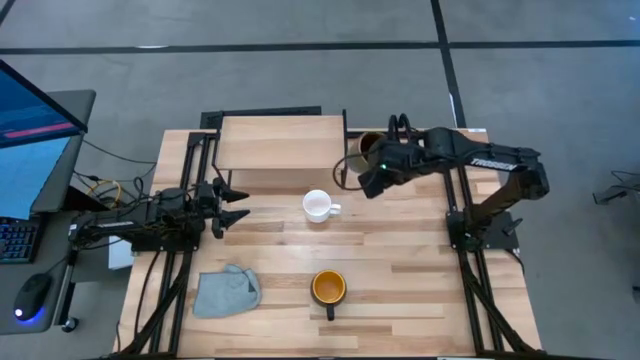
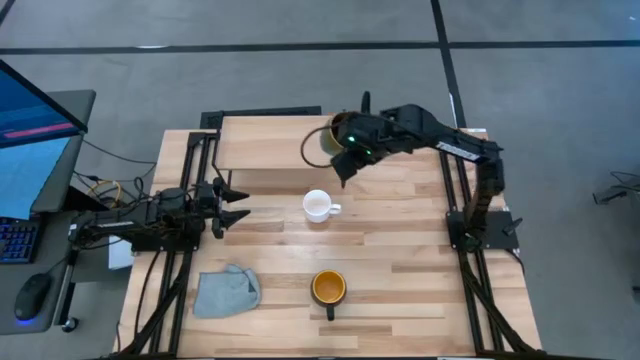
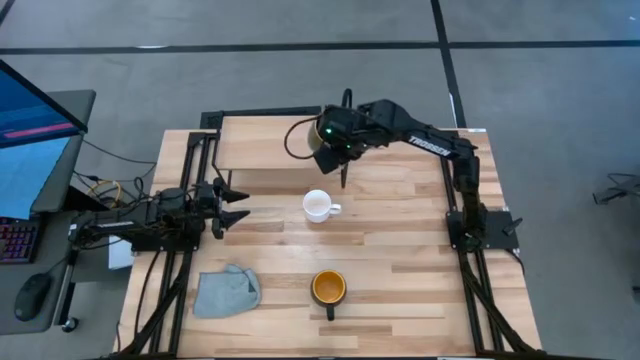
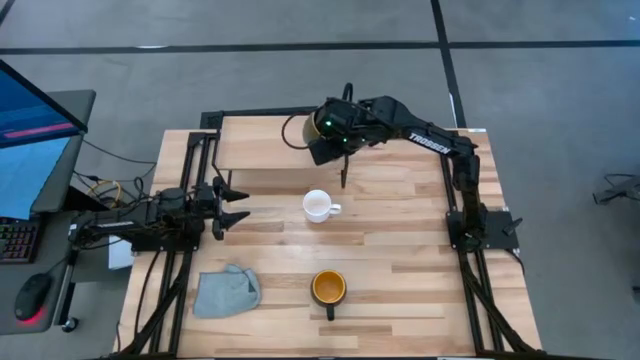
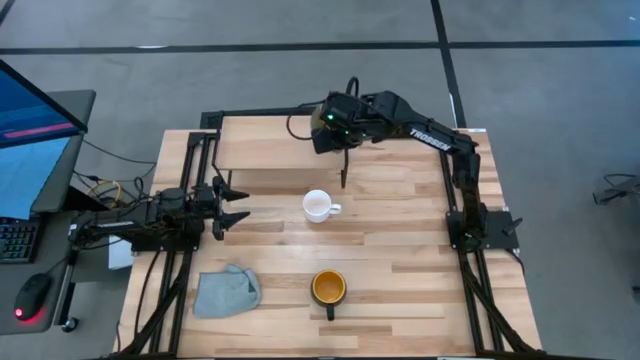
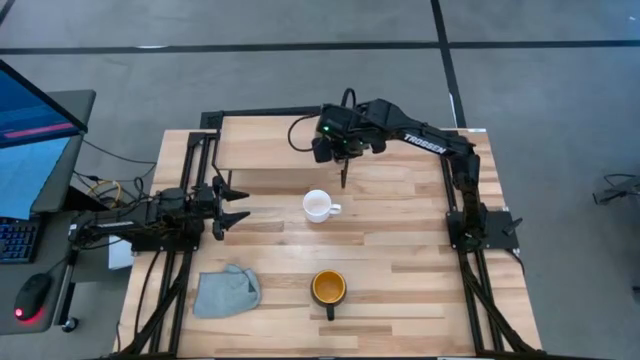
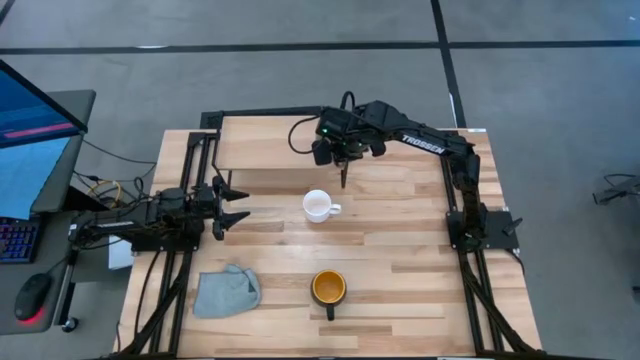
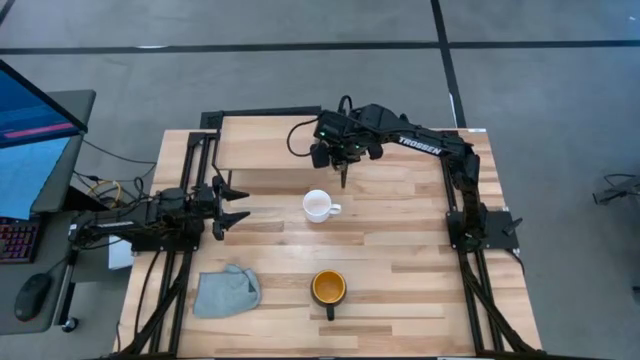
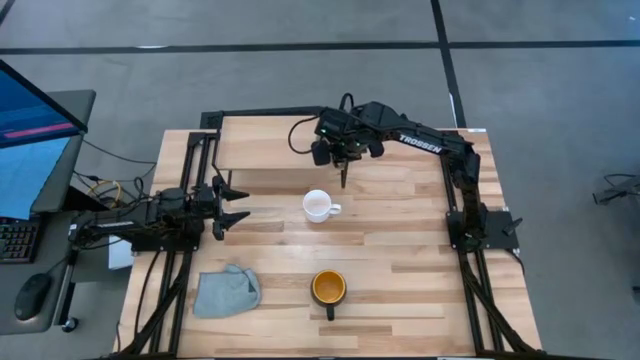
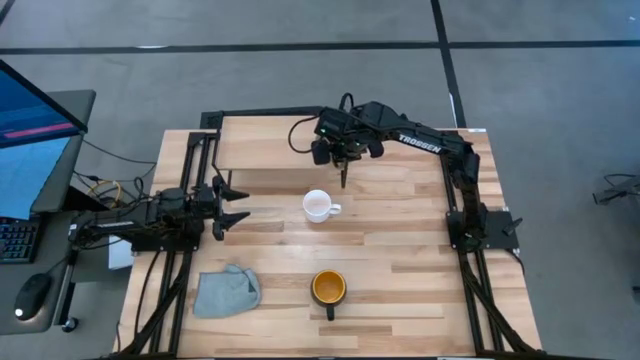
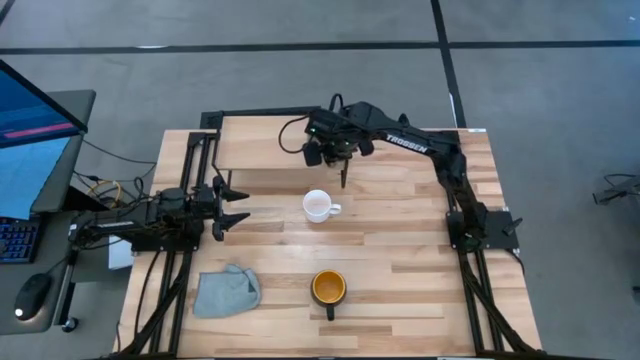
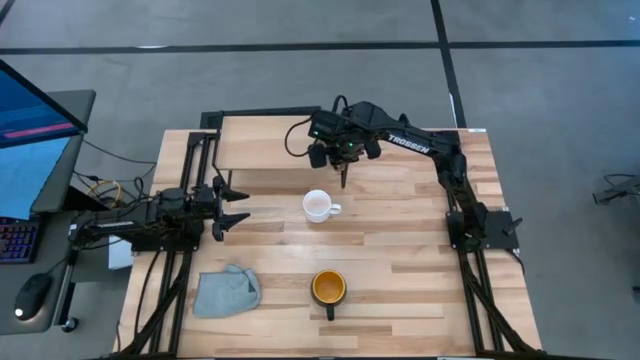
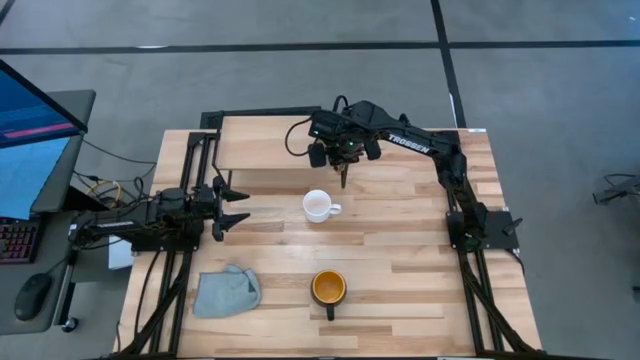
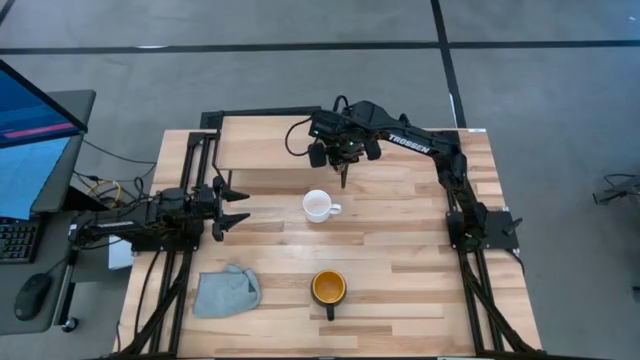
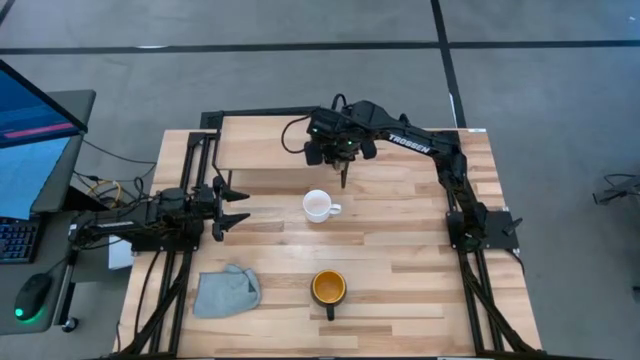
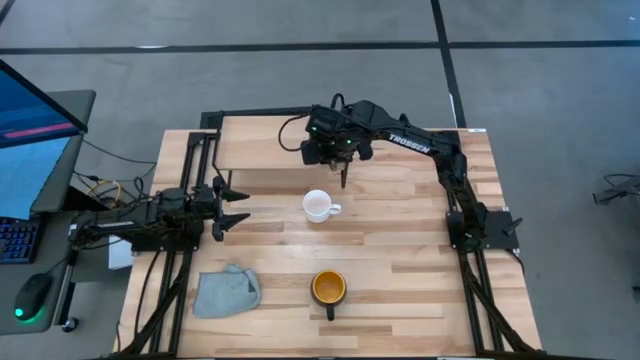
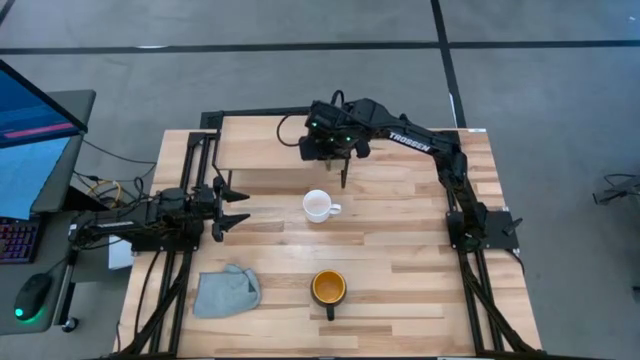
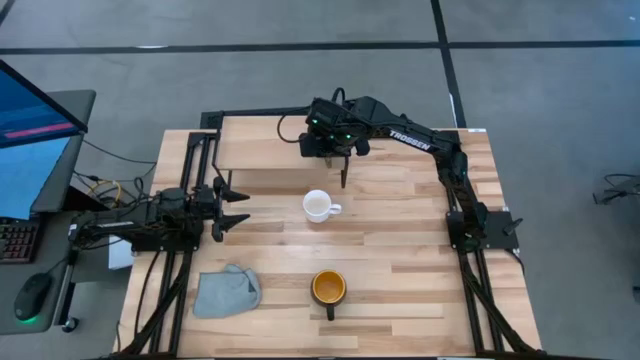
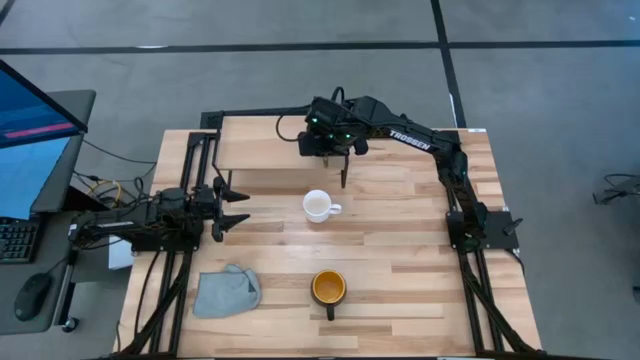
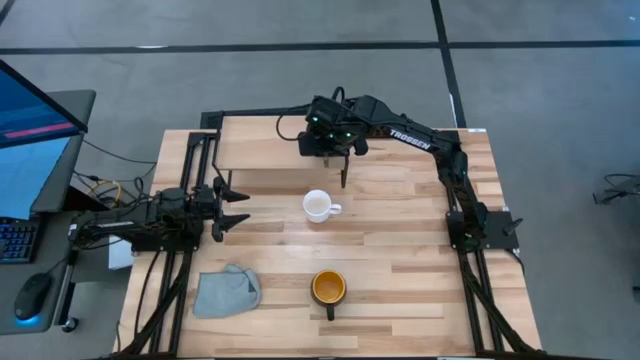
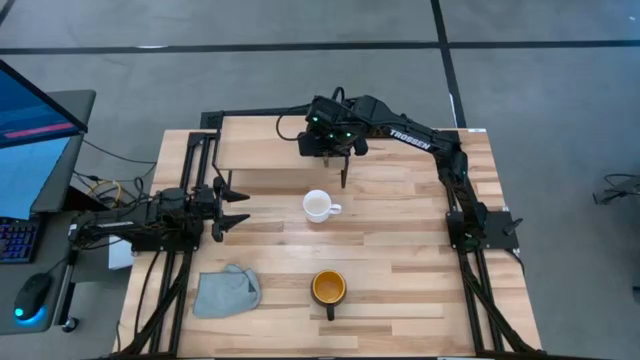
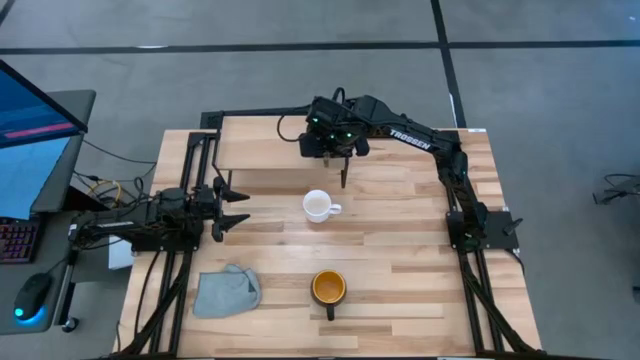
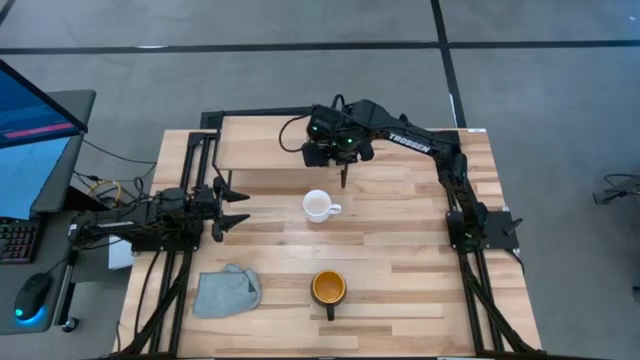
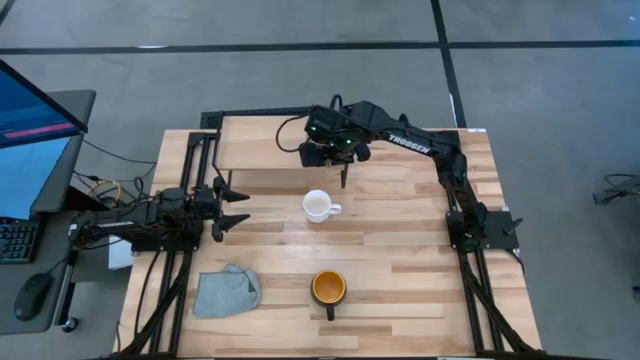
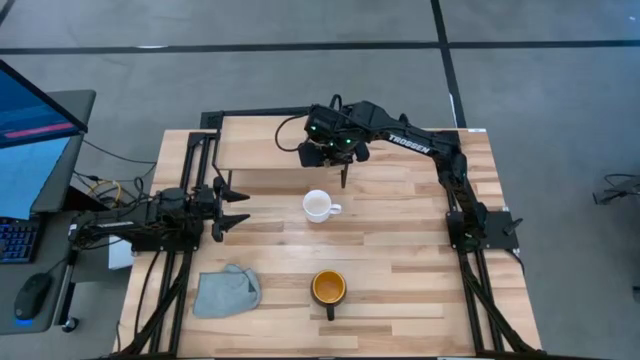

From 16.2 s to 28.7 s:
Task: Stack small to large cups/mugs on shelf
Put the brown green mug on the shelf

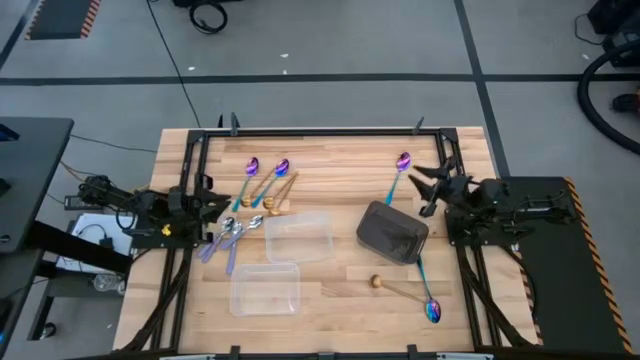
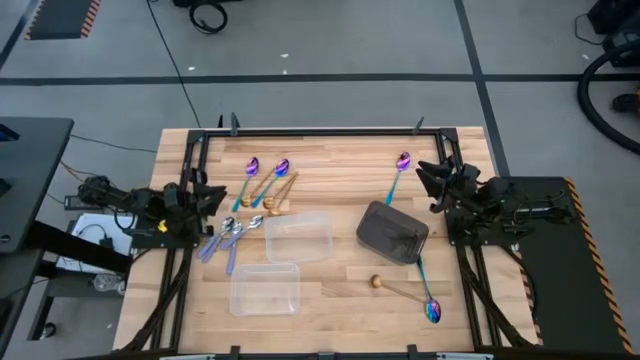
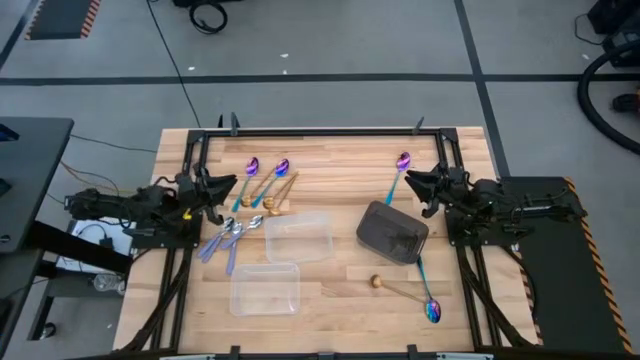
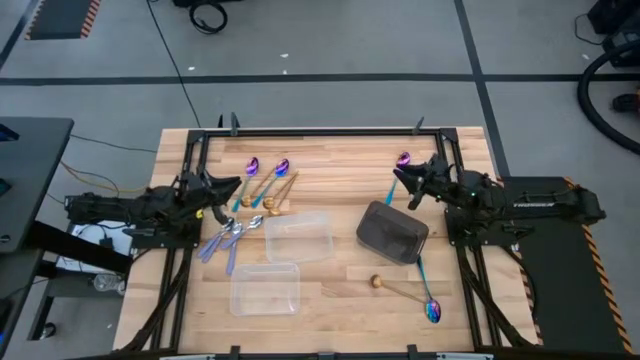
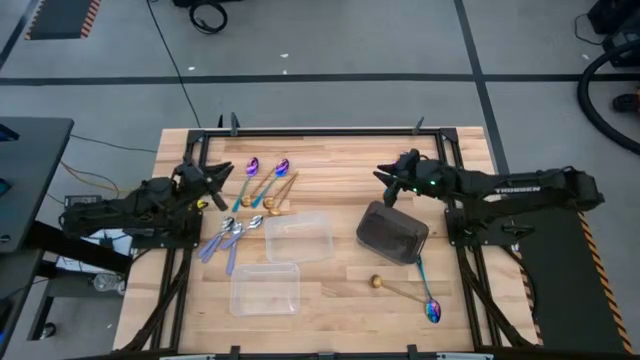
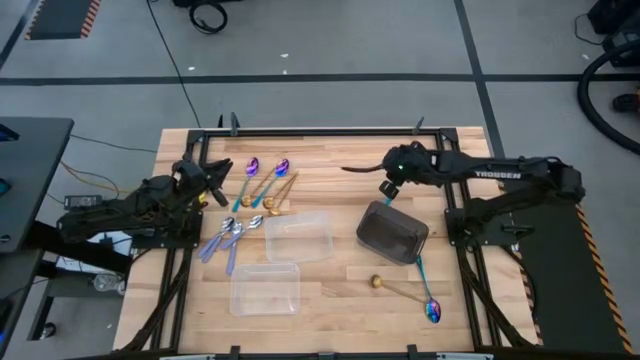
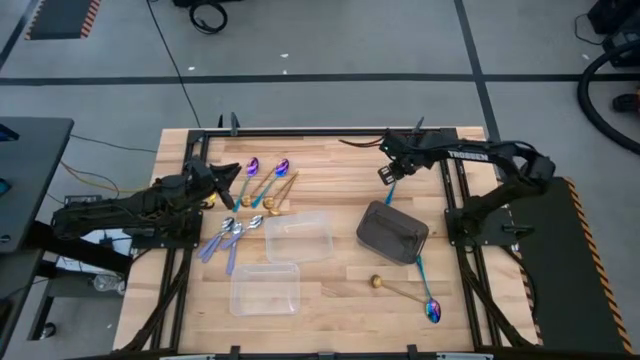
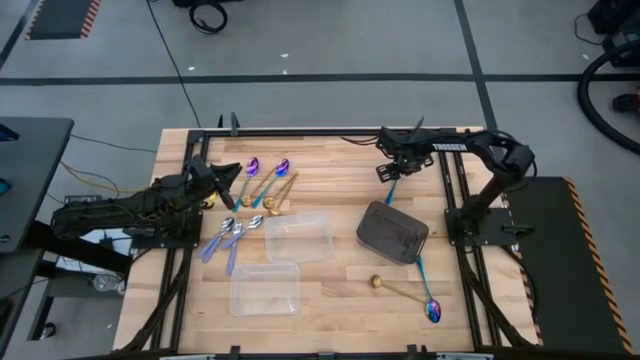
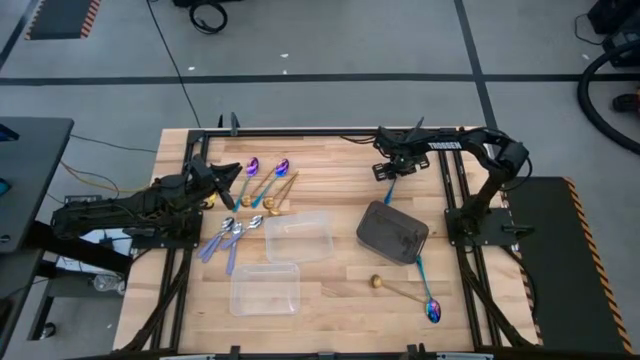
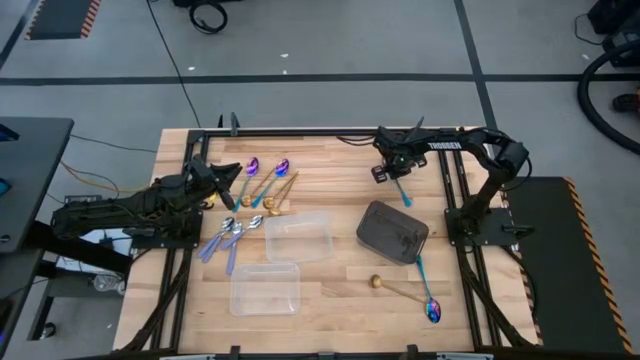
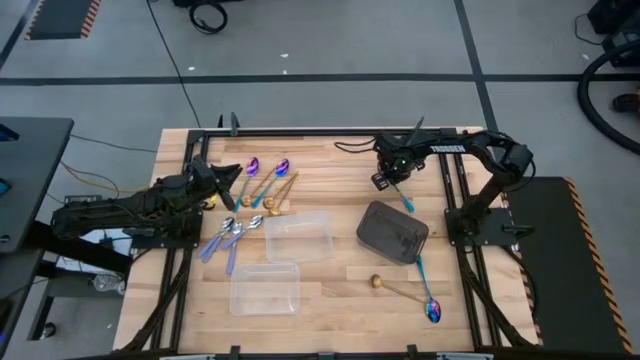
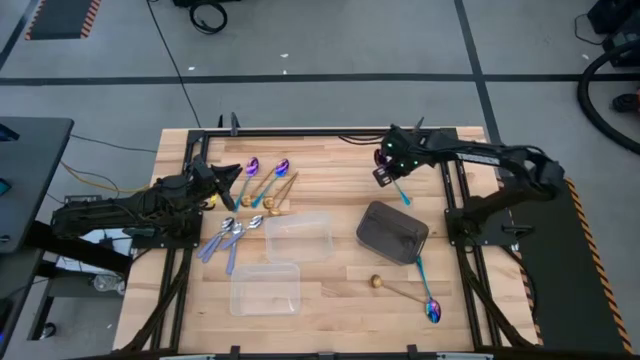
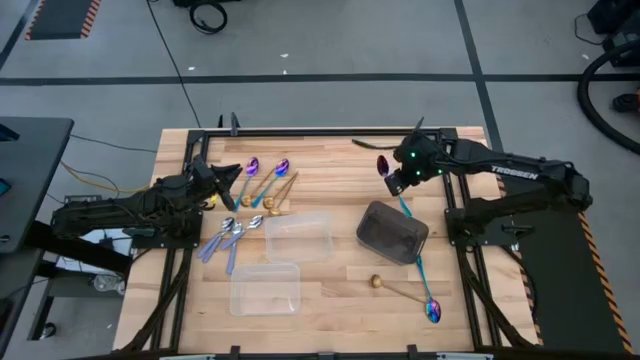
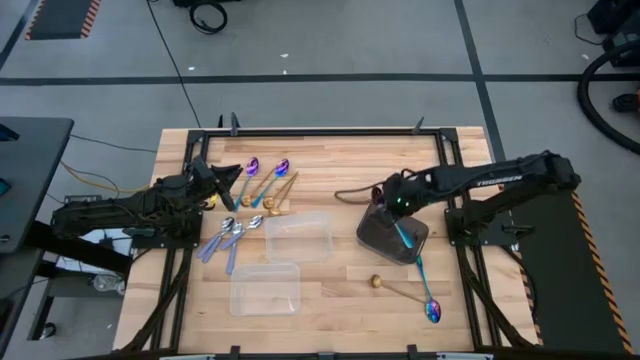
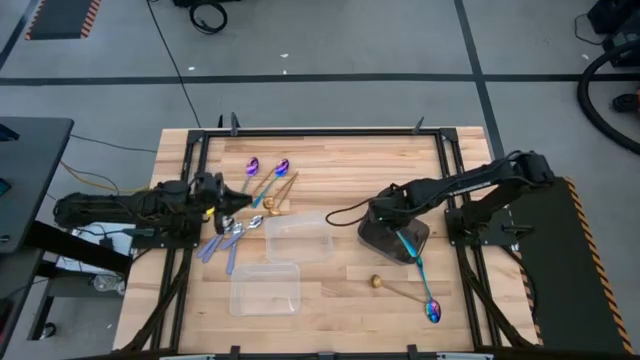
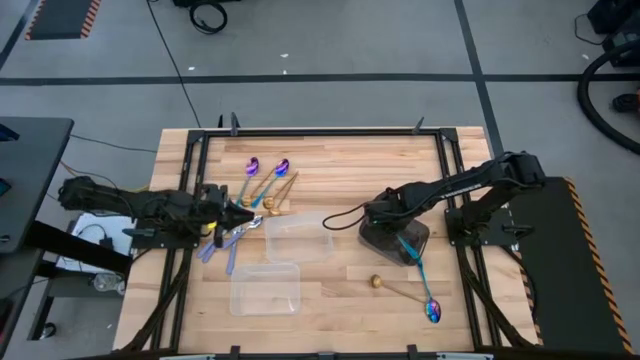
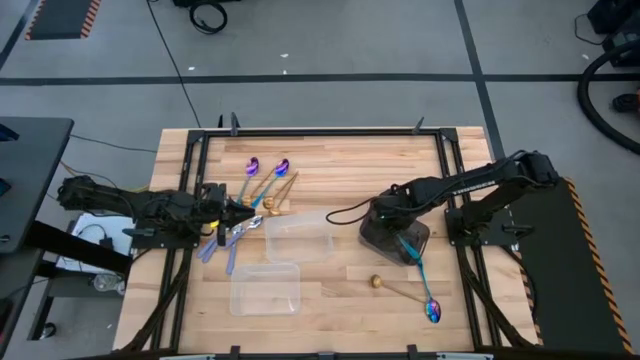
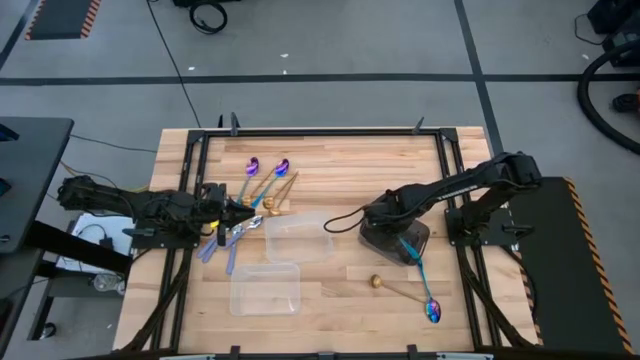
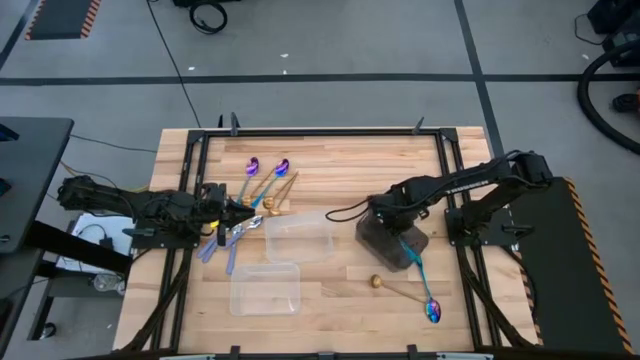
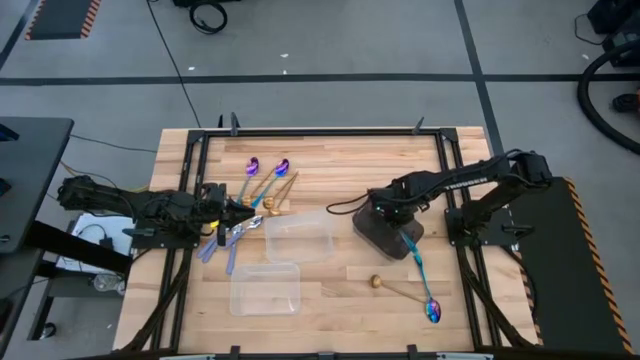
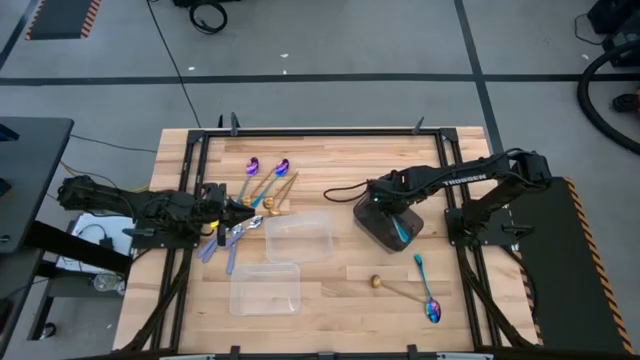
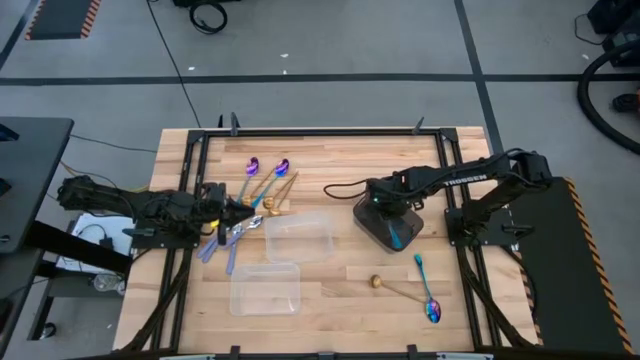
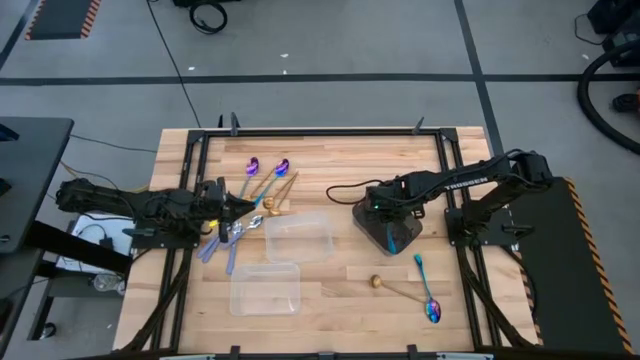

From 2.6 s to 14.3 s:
Task: Sort silverware by color (type)
Put the blue spoon into the black transparent bin
